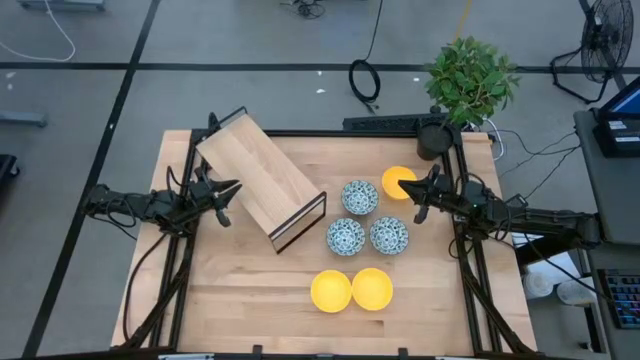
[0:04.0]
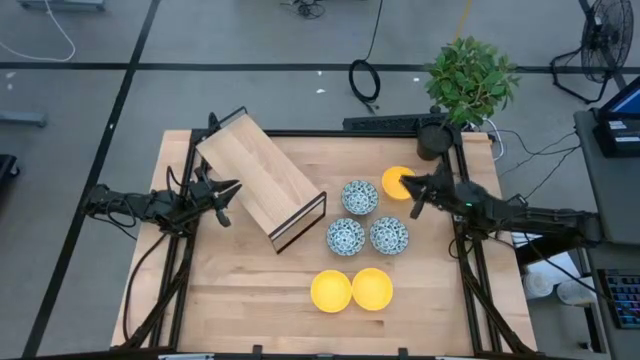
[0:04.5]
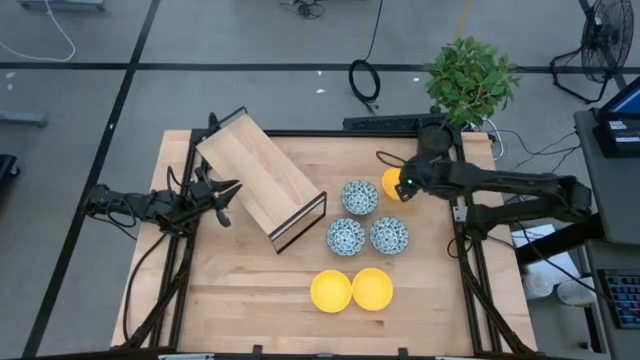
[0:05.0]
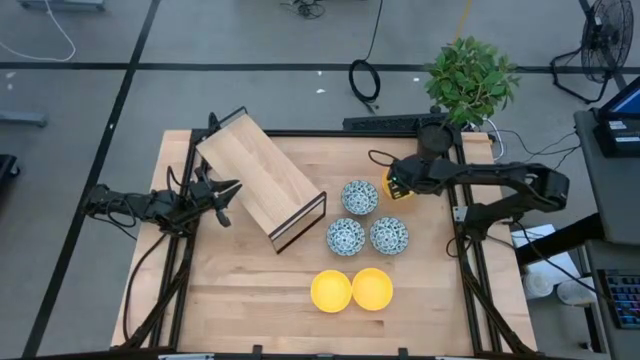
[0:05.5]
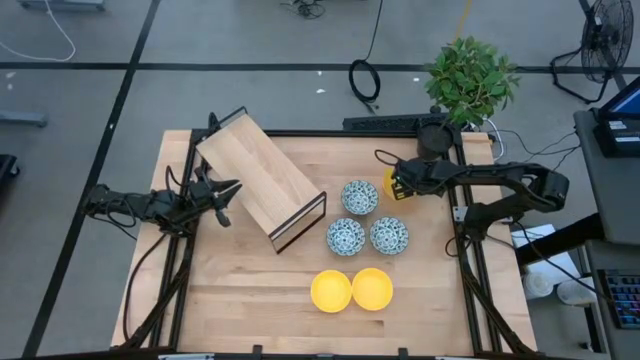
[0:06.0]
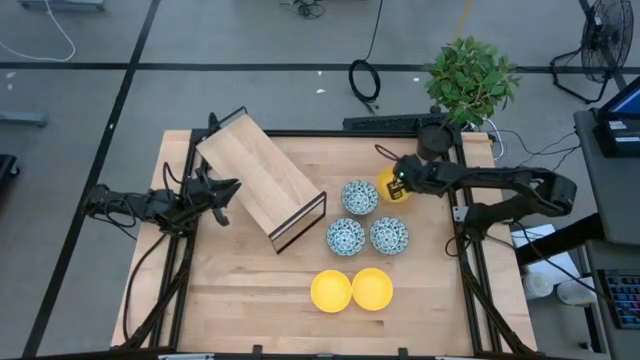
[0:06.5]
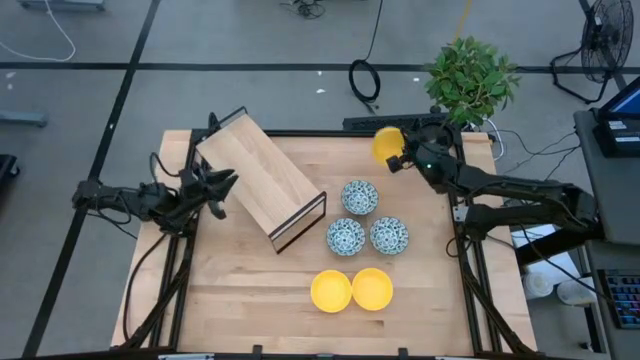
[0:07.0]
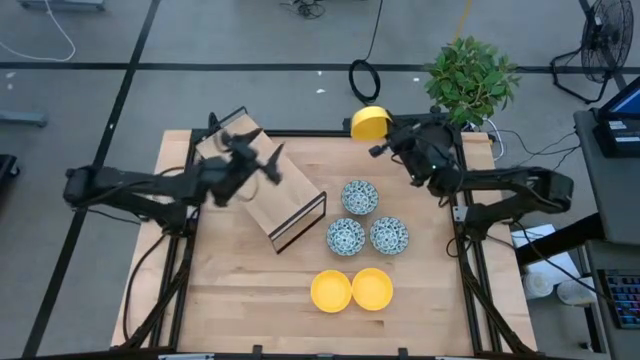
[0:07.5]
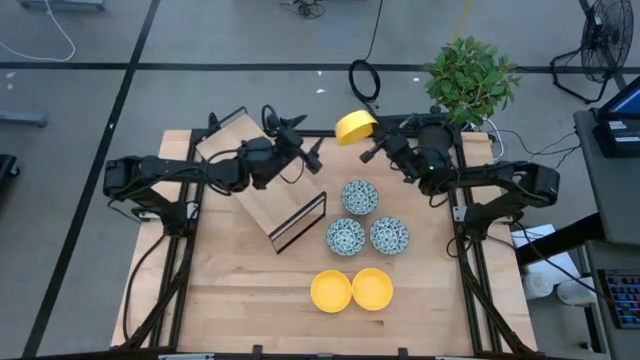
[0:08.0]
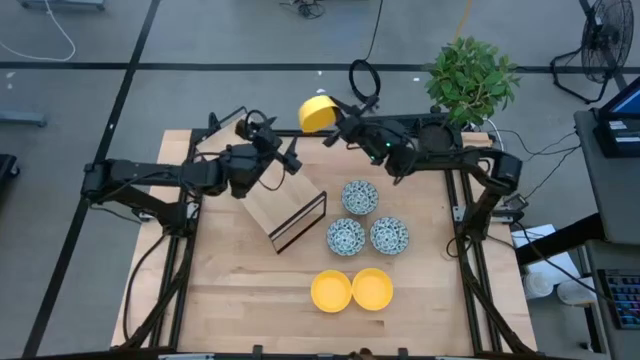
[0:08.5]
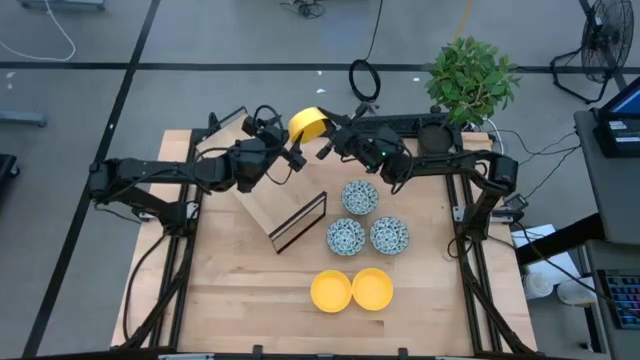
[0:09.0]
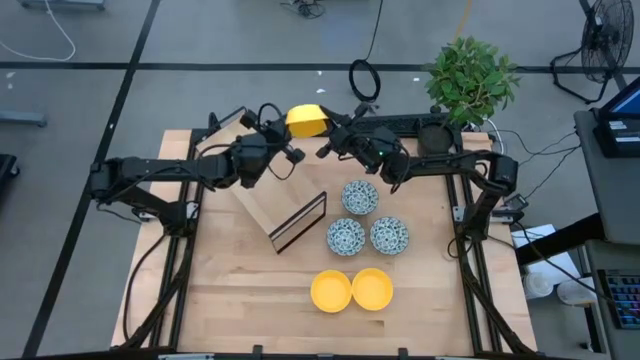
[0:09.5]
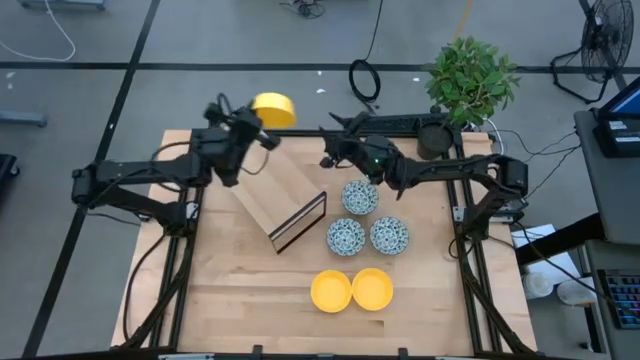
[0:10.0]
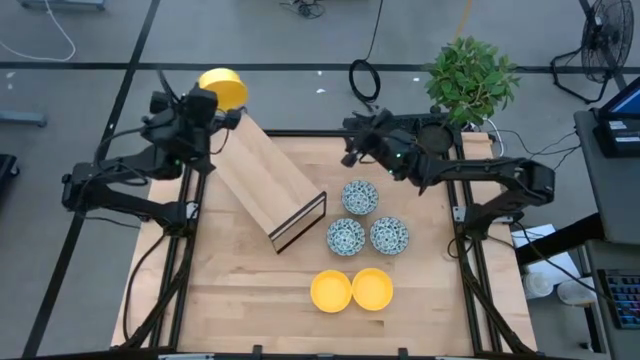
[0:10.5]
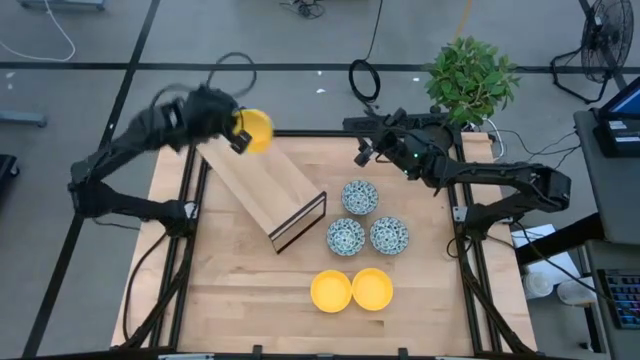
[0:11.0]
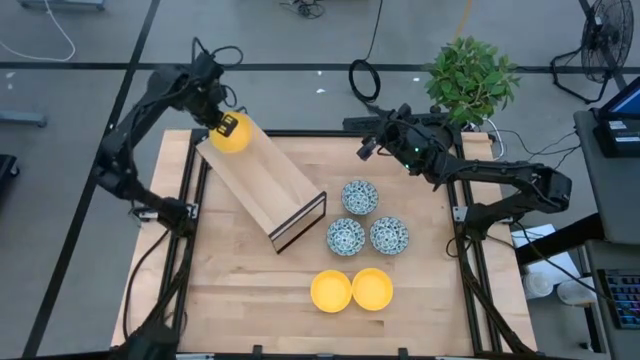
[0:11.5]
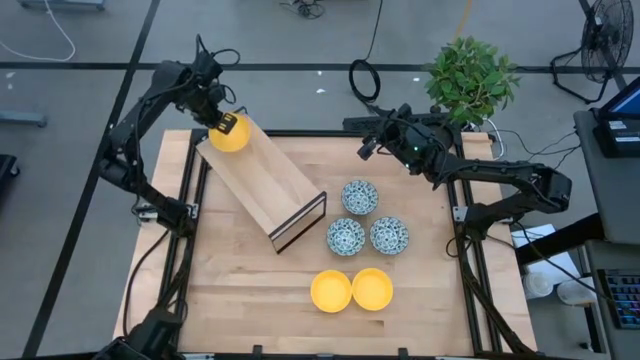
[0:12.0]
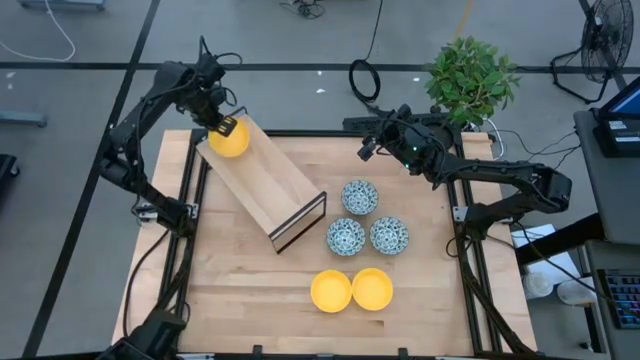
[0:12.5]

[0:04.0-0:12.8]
Task: Pick & Place Mini bowls
Put the top yellow bowl on the shelf

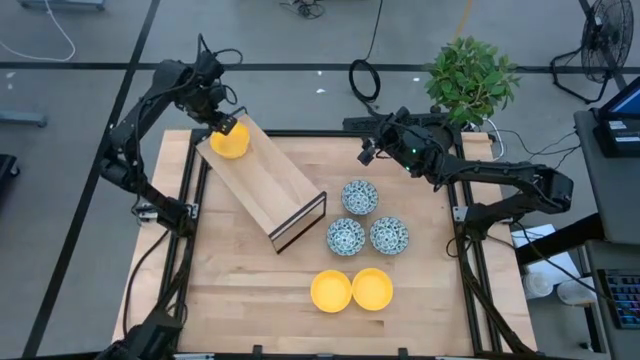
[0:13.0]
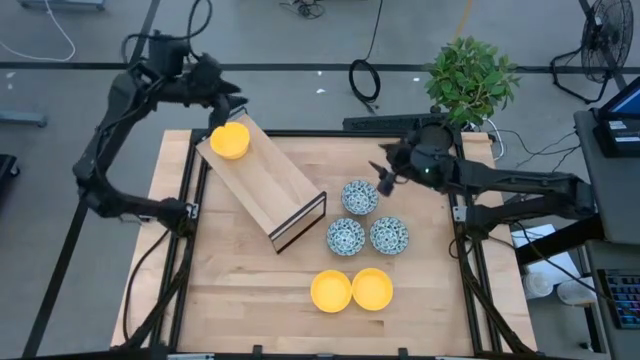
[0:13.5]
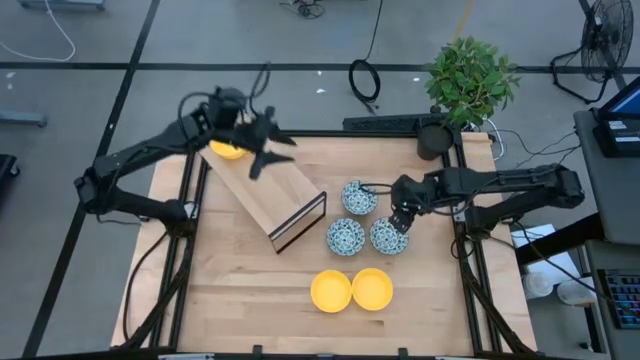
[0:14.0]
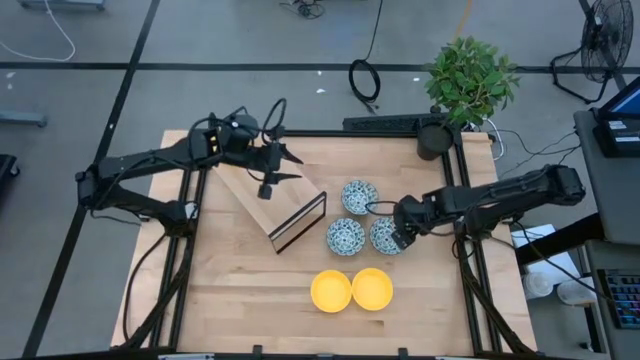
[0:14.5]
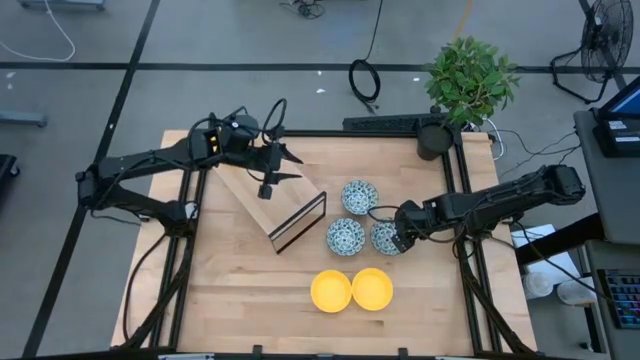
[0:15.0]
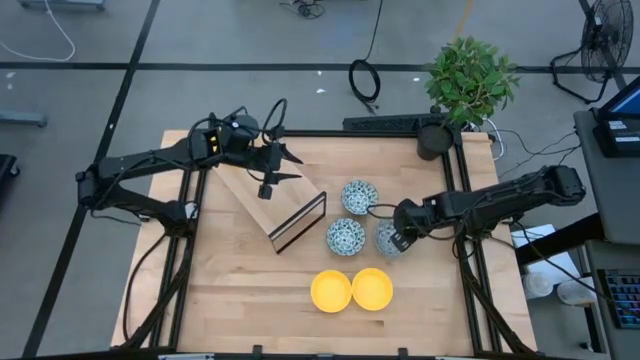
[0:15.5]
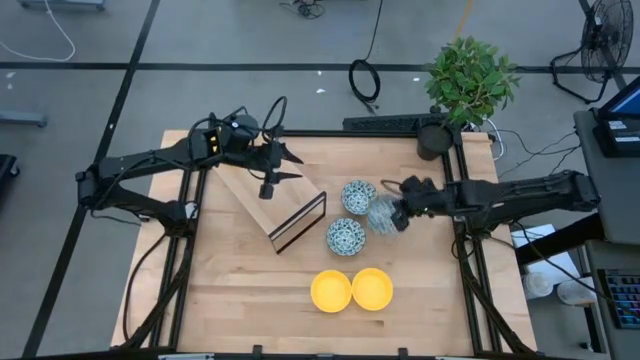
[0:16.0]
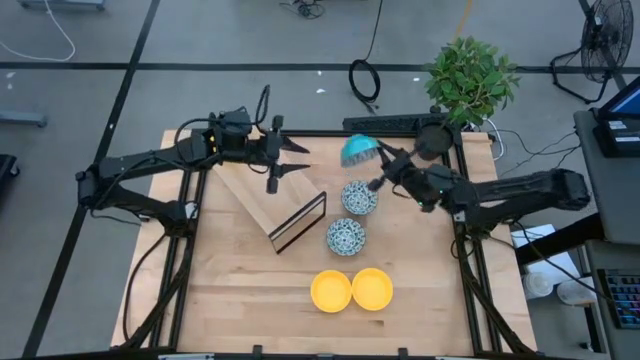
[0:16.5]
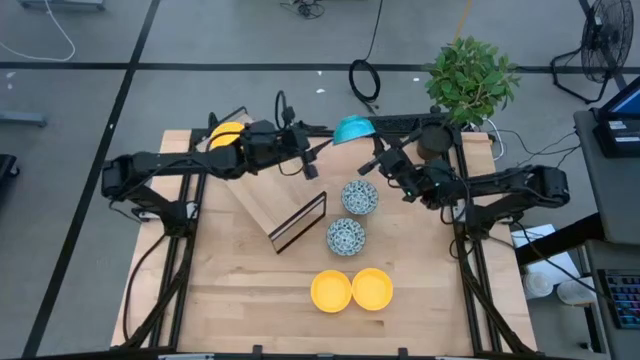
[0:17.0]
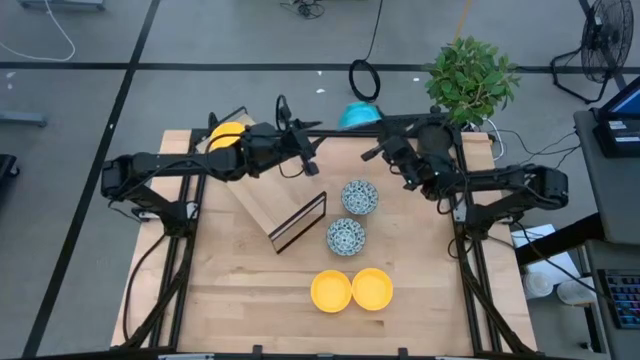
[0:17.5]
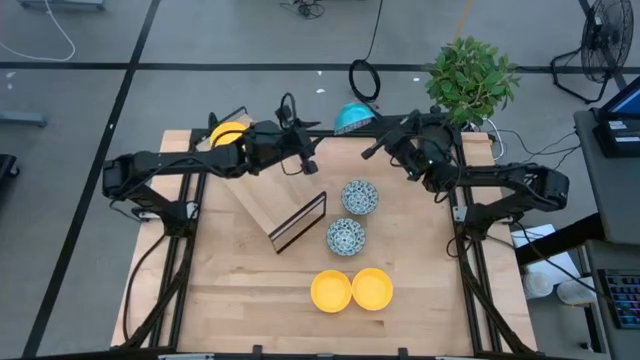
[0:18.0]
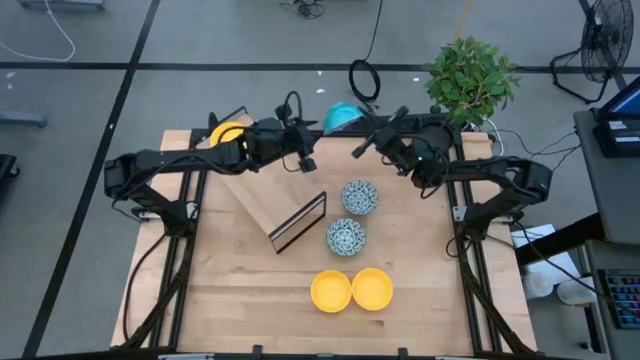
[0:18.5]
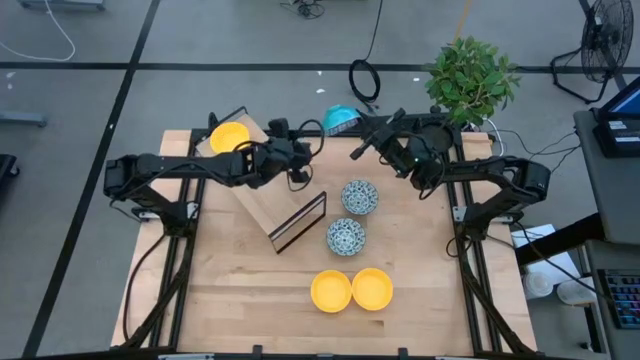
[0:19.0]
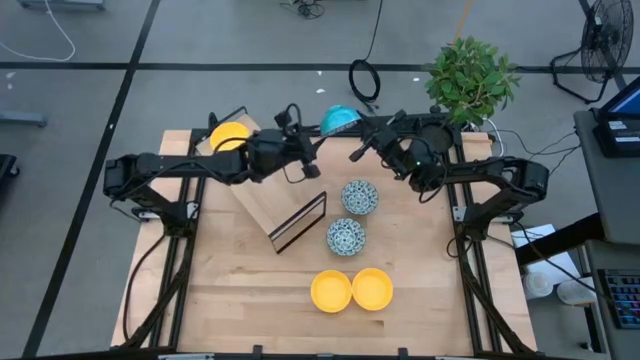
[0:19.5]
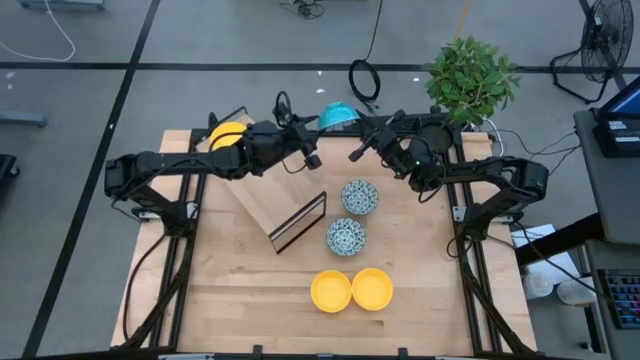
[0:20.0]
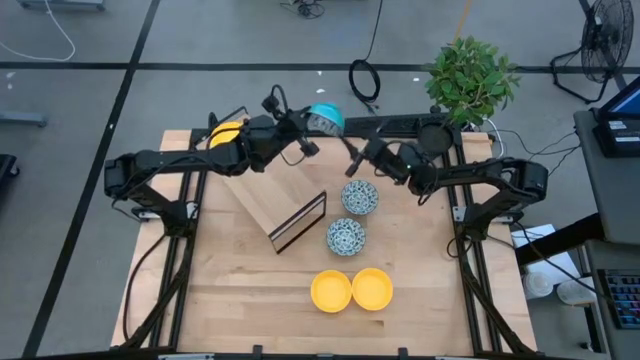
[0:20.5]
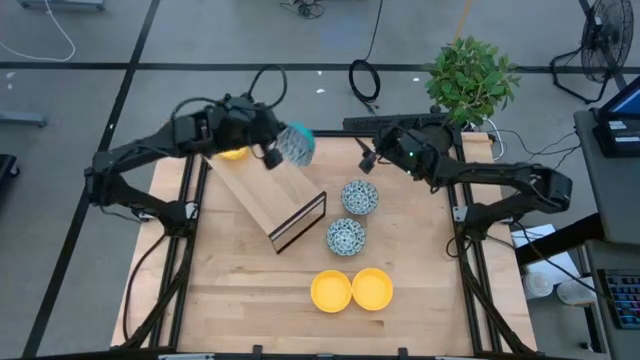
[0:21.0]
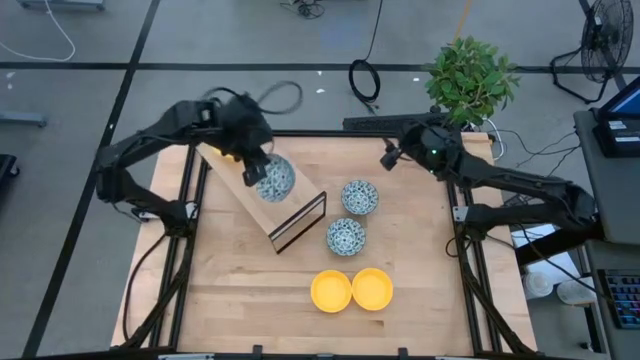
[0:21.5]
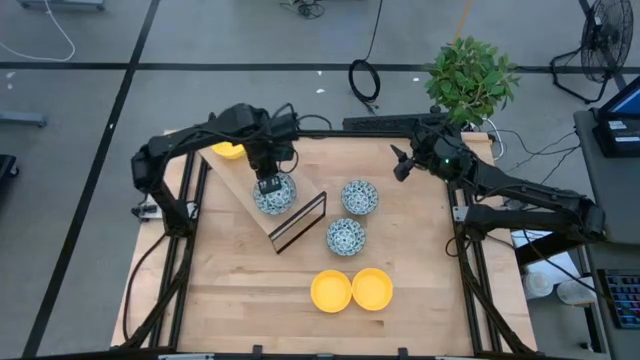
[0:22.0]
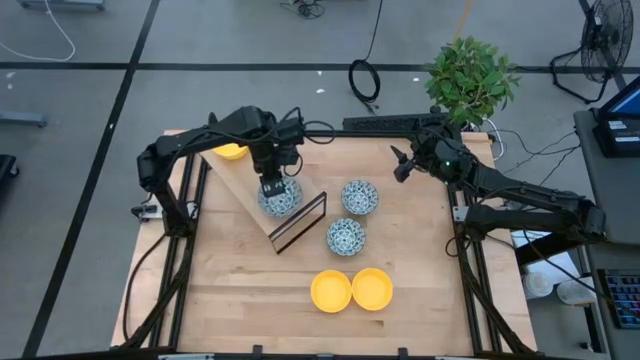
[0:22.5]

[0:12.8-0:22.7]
Put the bottom right green patterned bowl on the shelf

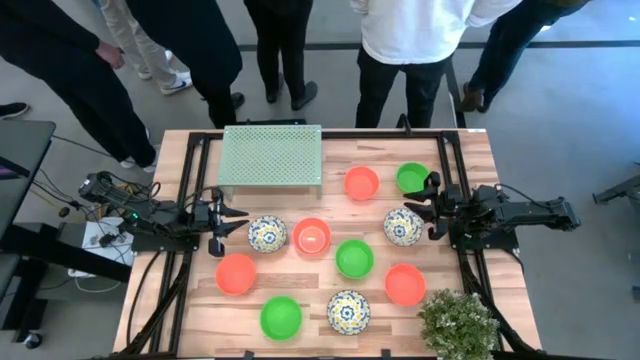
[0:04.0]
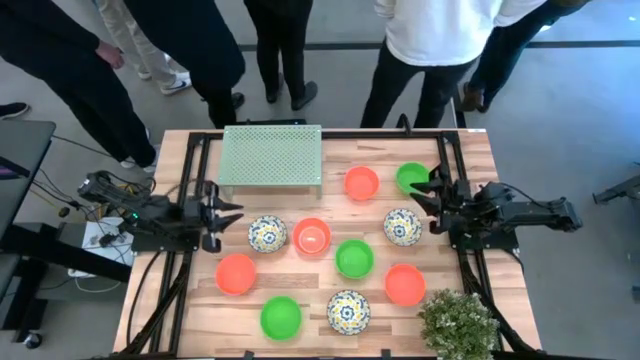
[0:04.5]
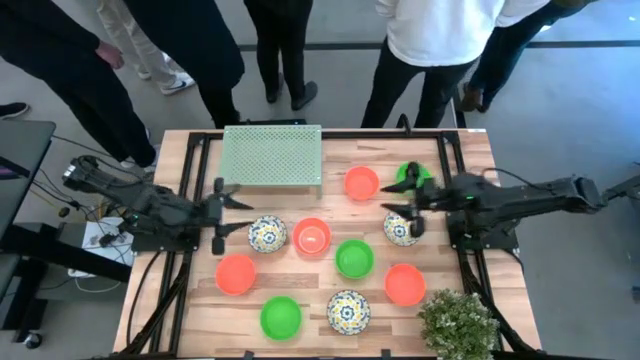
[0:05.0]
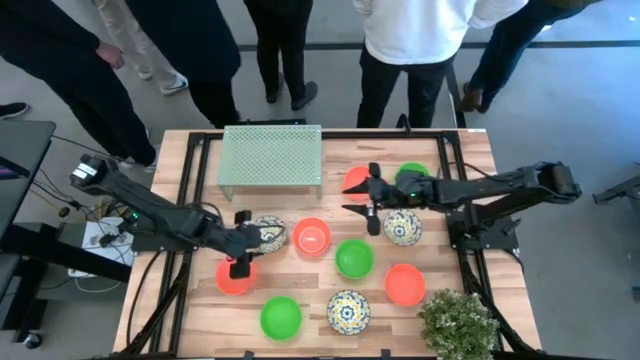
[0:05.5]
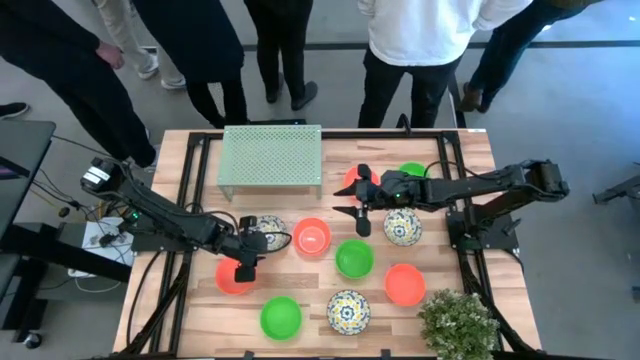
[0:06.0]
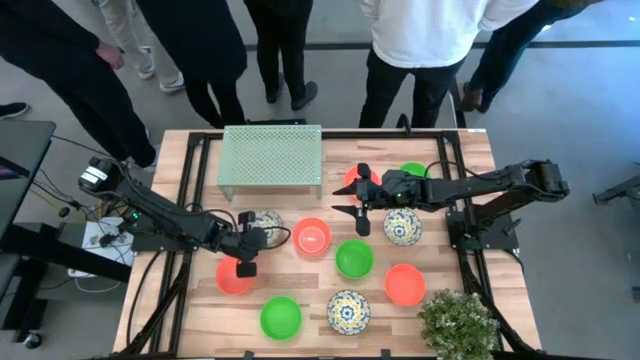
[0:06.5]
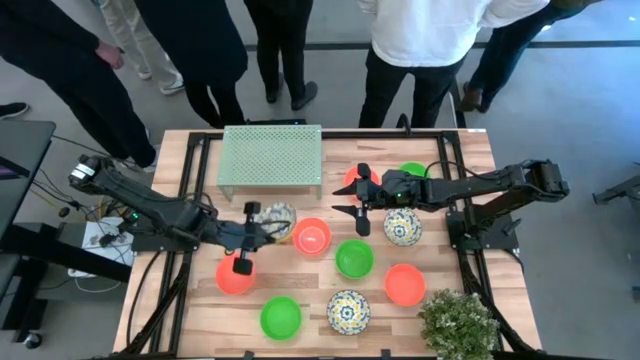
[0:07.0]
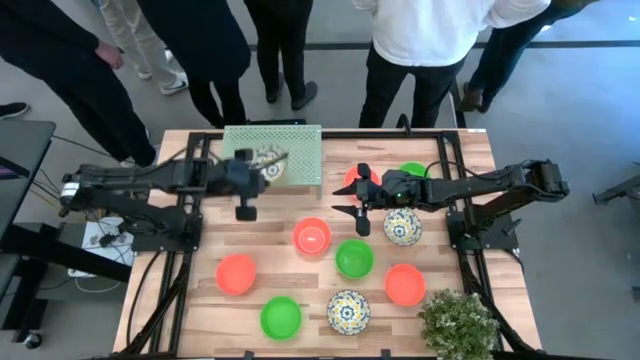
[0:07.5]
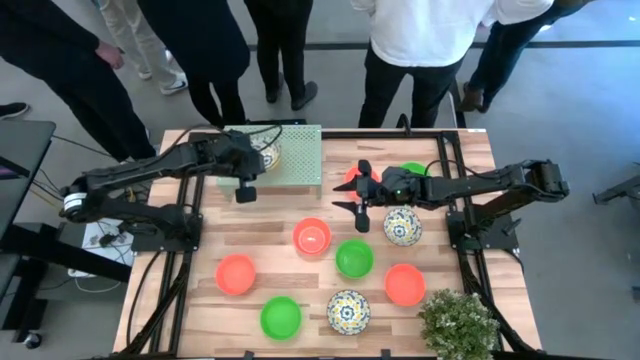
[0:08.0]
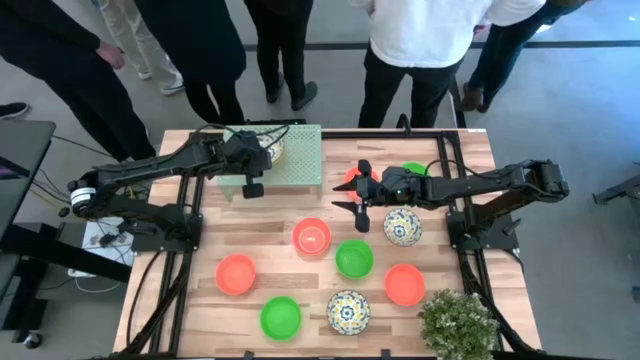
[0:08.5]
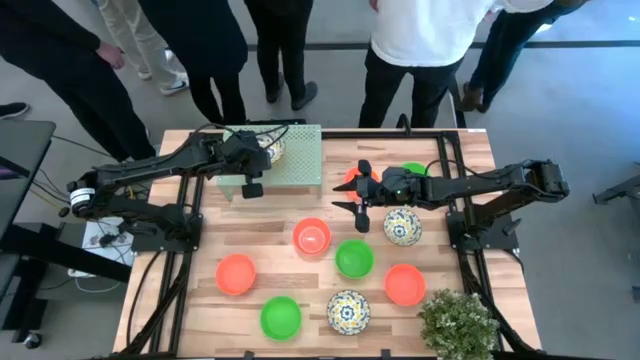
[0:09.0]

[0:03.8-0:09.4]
Task: Pick & Place Mini bowls
Put the white patterned bowl on the shelf
